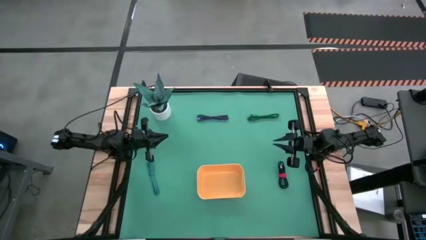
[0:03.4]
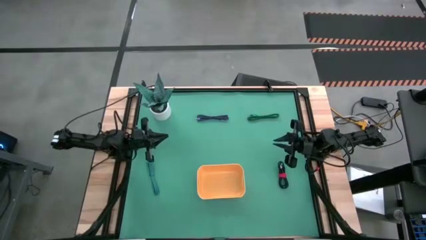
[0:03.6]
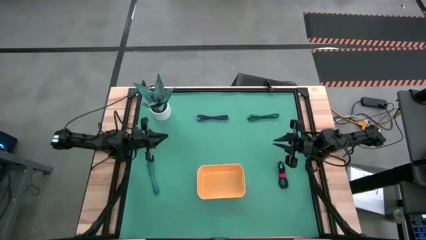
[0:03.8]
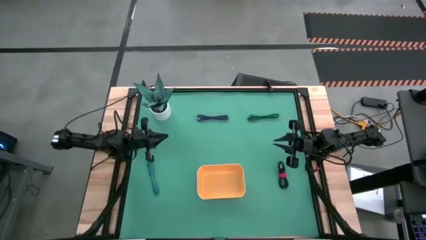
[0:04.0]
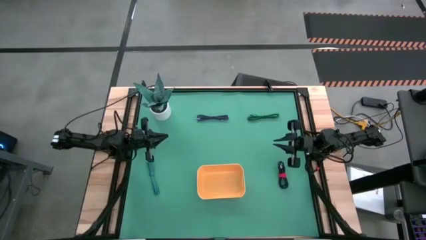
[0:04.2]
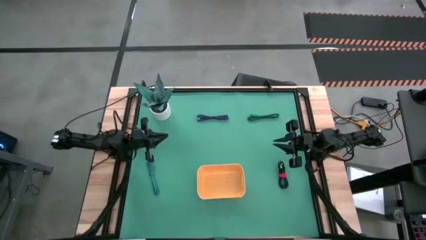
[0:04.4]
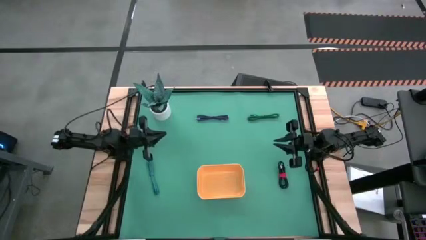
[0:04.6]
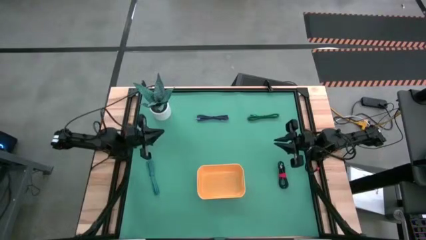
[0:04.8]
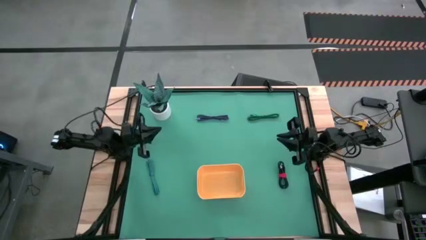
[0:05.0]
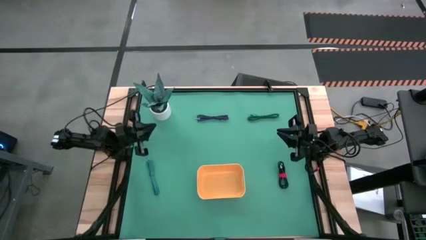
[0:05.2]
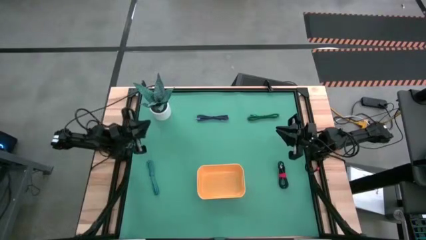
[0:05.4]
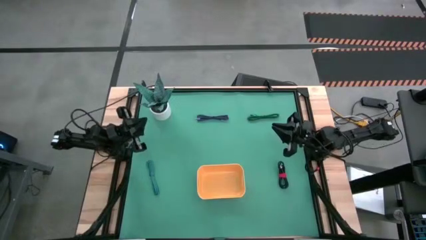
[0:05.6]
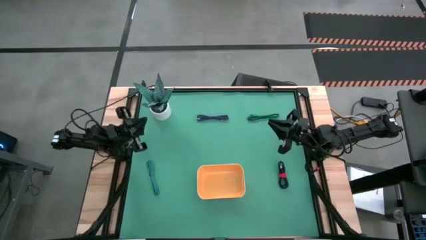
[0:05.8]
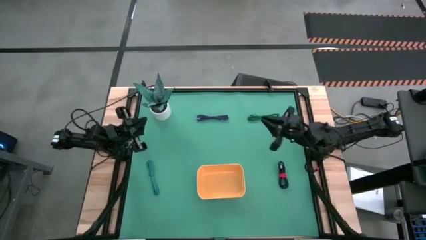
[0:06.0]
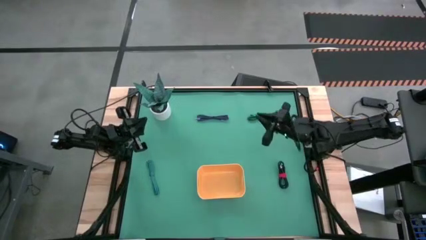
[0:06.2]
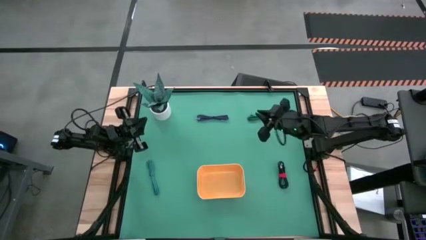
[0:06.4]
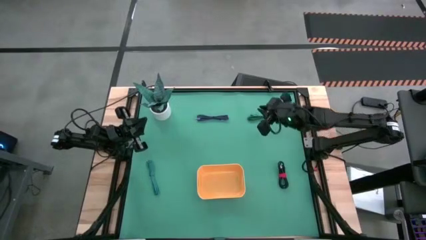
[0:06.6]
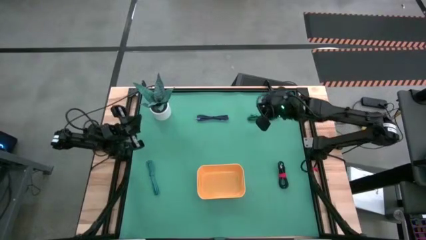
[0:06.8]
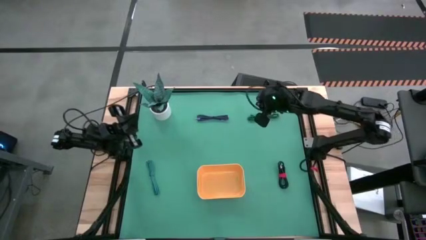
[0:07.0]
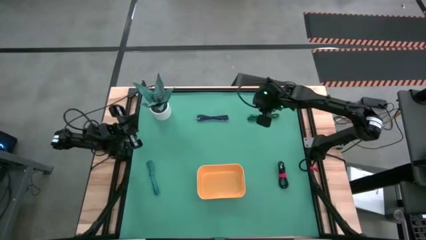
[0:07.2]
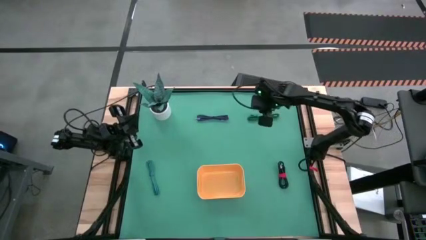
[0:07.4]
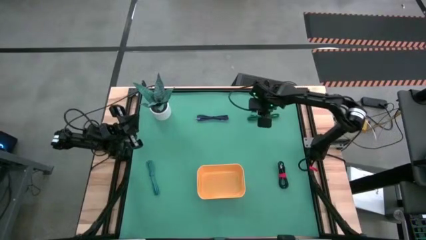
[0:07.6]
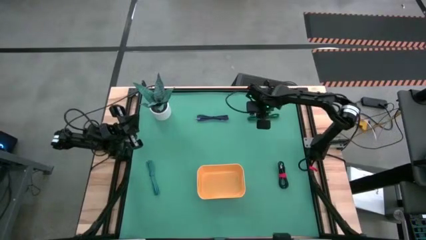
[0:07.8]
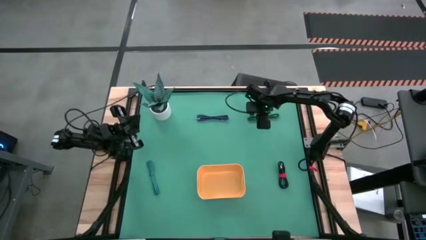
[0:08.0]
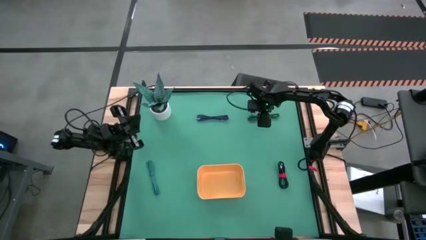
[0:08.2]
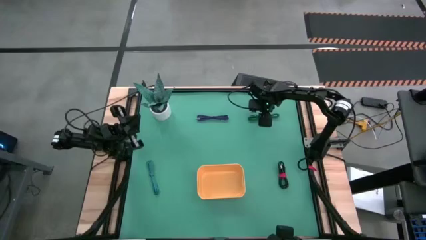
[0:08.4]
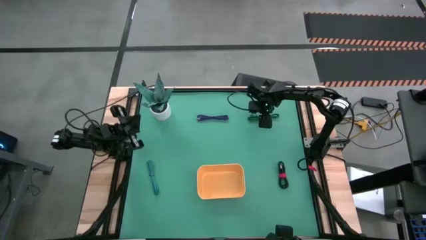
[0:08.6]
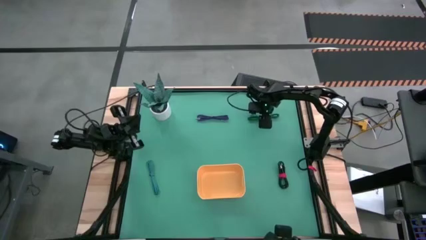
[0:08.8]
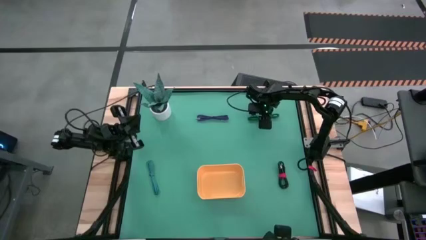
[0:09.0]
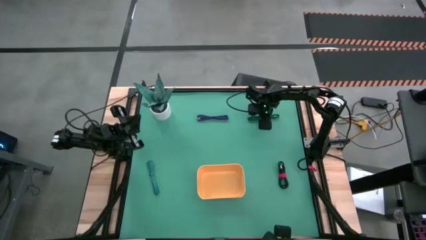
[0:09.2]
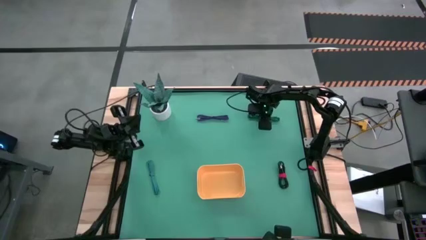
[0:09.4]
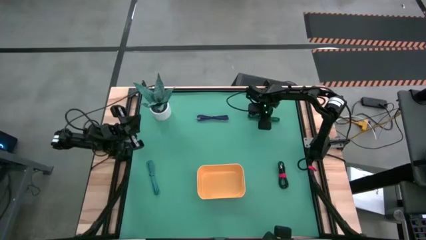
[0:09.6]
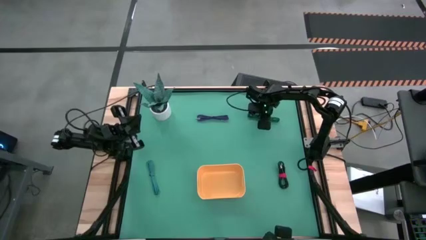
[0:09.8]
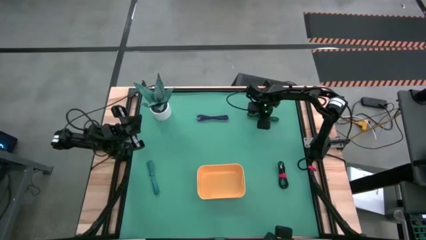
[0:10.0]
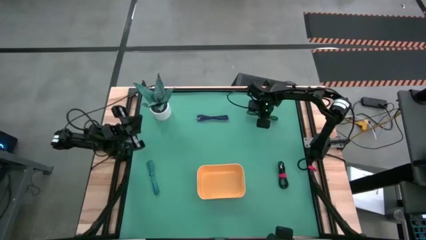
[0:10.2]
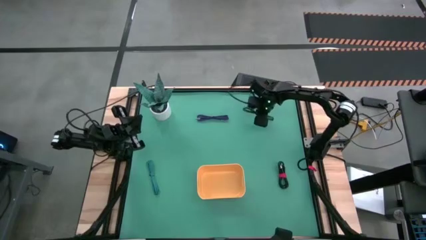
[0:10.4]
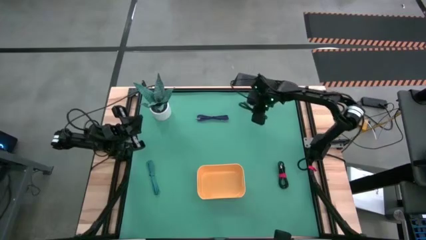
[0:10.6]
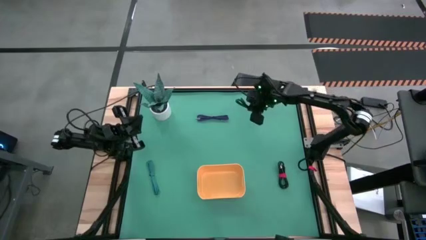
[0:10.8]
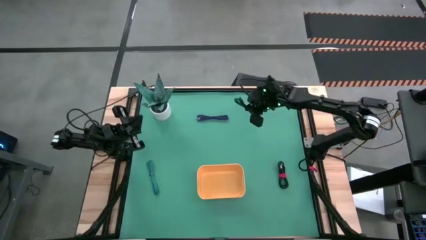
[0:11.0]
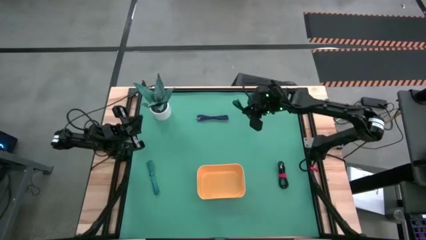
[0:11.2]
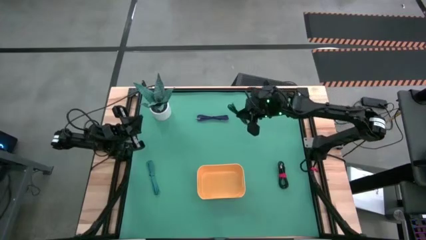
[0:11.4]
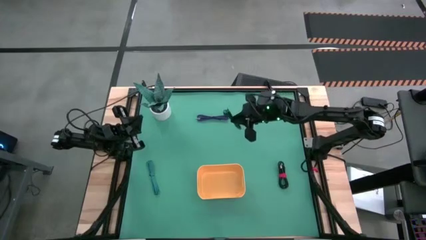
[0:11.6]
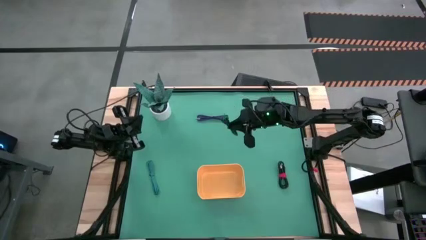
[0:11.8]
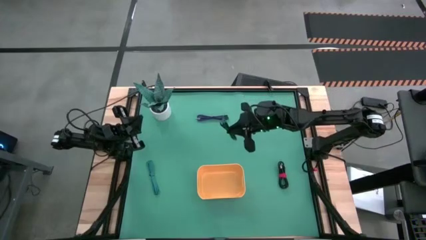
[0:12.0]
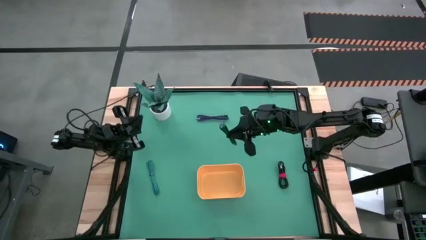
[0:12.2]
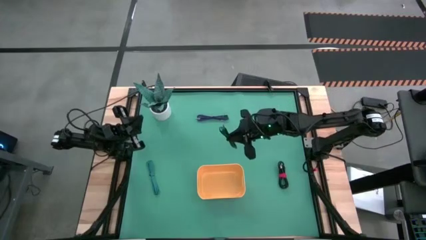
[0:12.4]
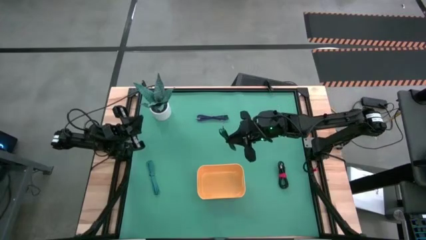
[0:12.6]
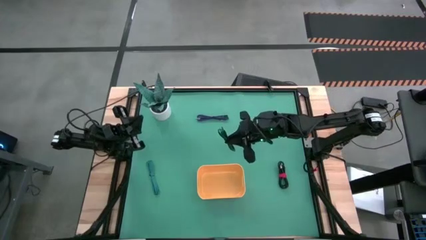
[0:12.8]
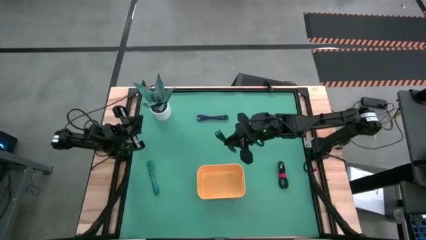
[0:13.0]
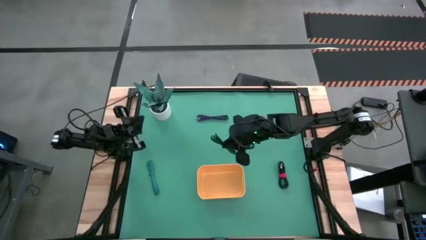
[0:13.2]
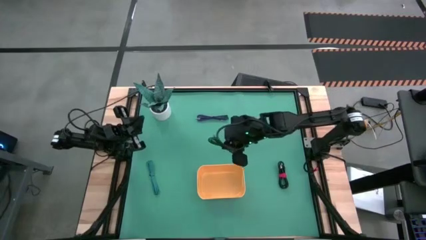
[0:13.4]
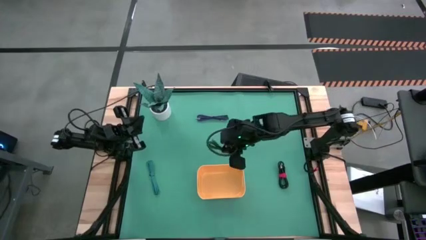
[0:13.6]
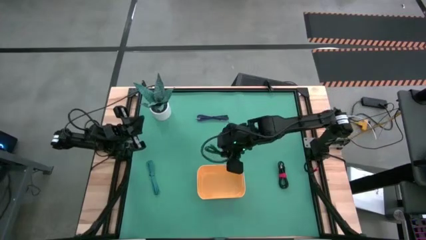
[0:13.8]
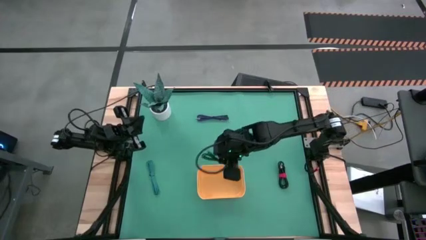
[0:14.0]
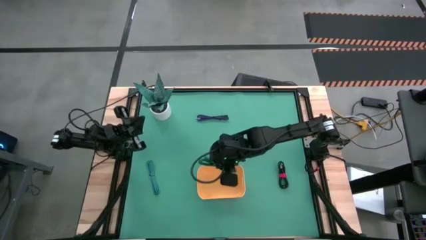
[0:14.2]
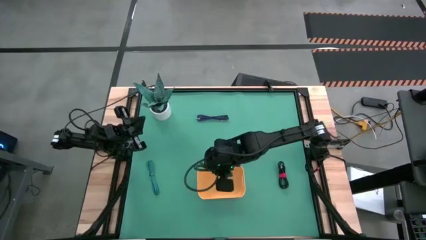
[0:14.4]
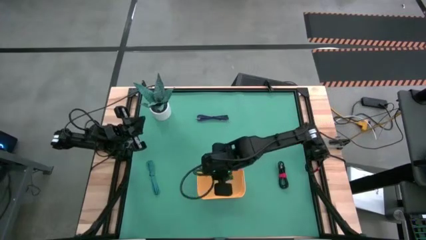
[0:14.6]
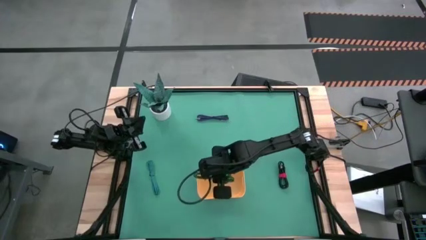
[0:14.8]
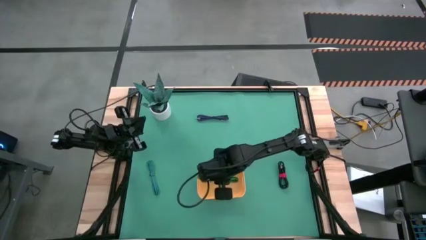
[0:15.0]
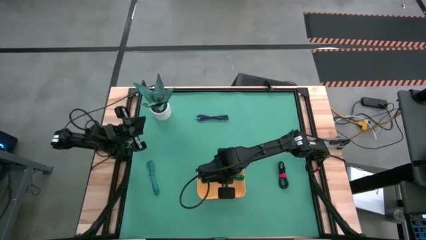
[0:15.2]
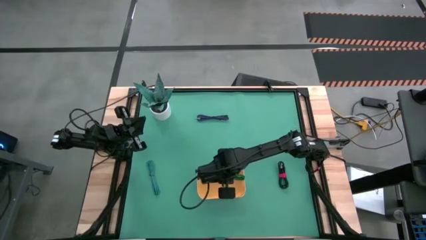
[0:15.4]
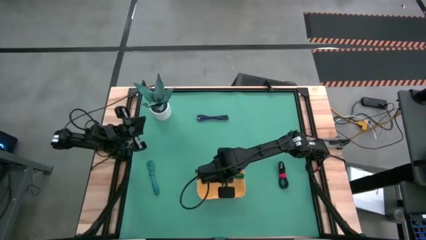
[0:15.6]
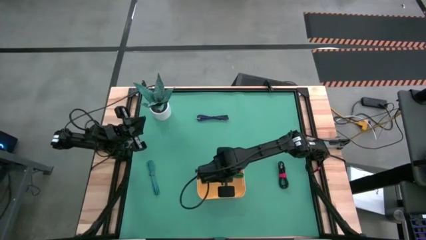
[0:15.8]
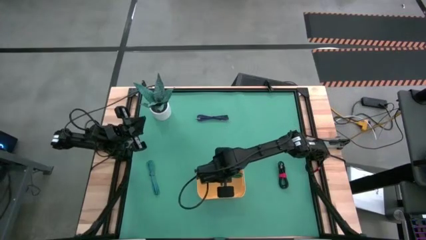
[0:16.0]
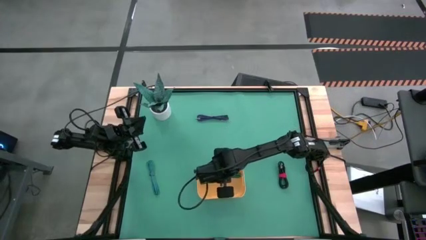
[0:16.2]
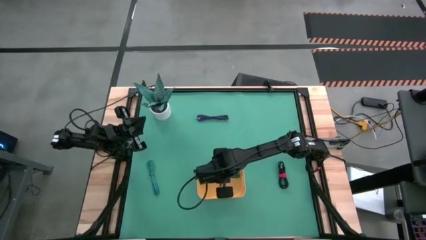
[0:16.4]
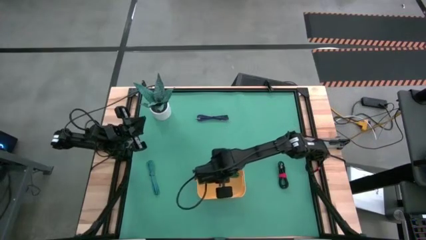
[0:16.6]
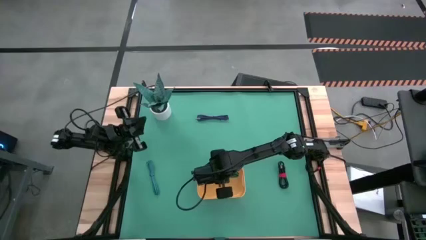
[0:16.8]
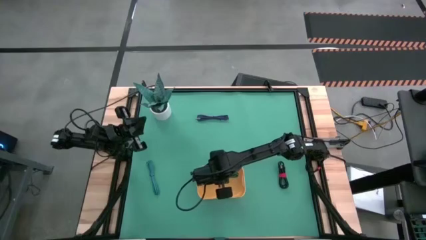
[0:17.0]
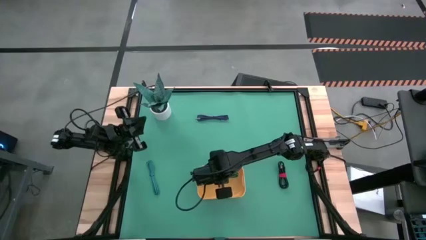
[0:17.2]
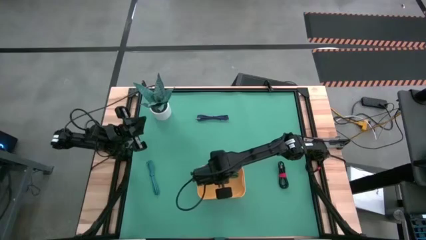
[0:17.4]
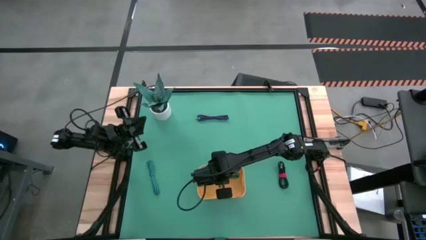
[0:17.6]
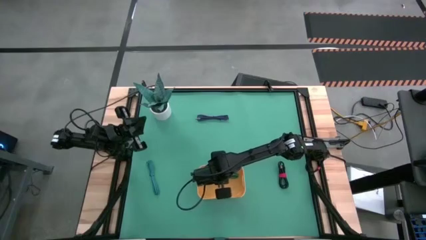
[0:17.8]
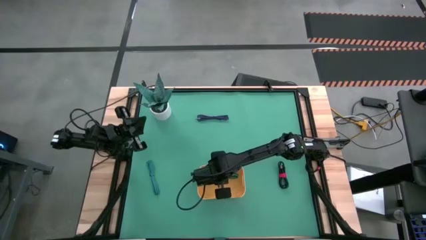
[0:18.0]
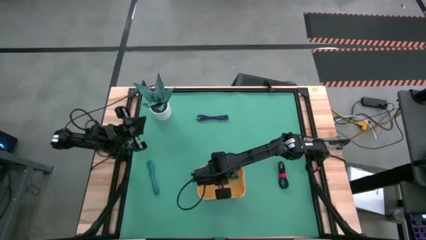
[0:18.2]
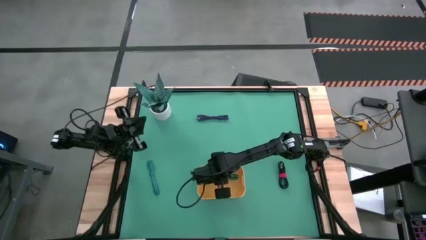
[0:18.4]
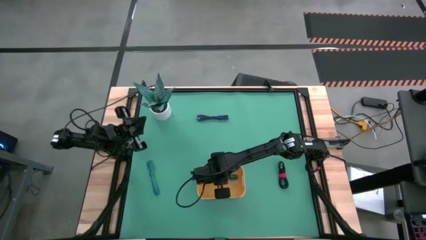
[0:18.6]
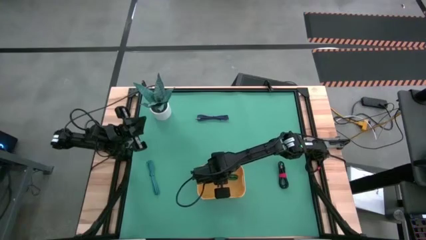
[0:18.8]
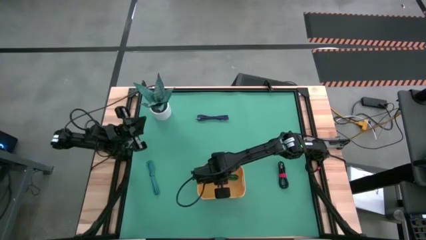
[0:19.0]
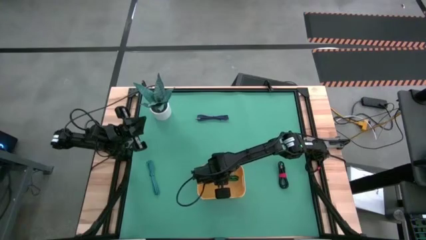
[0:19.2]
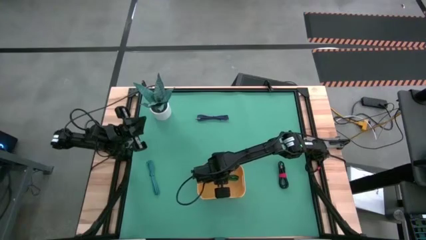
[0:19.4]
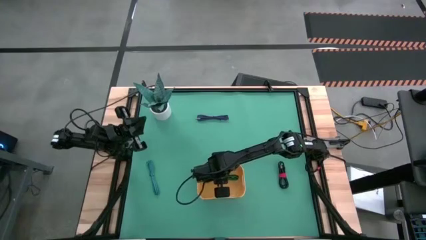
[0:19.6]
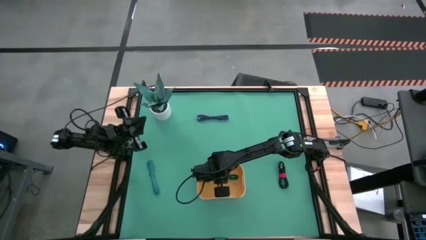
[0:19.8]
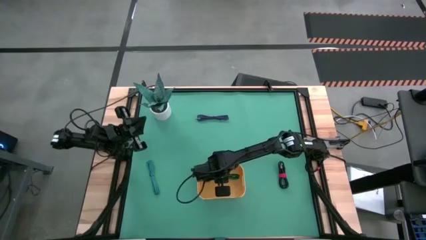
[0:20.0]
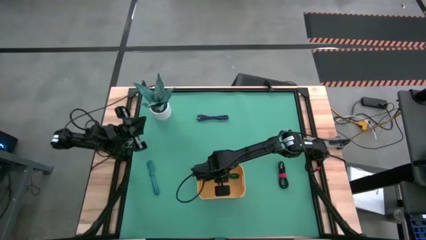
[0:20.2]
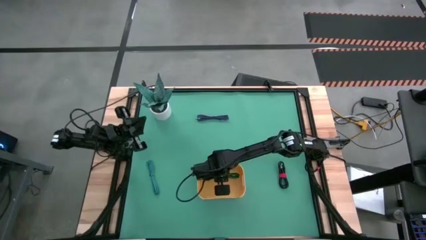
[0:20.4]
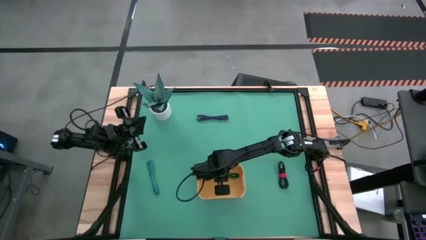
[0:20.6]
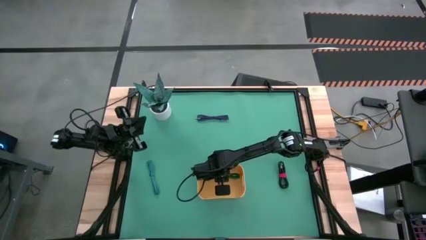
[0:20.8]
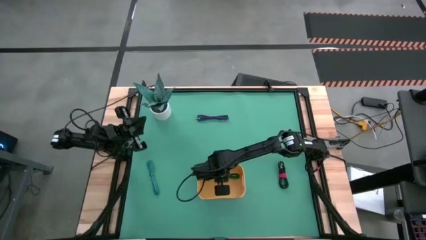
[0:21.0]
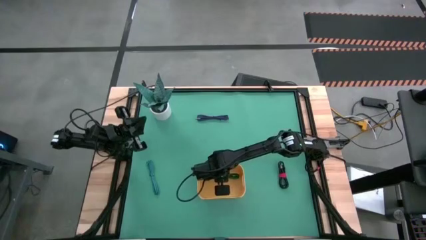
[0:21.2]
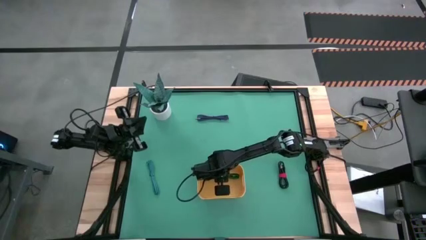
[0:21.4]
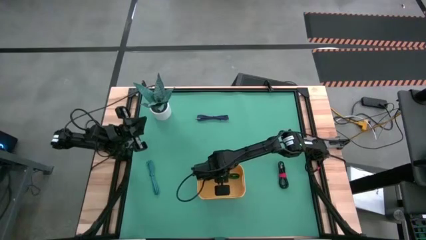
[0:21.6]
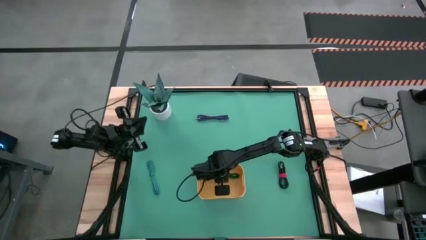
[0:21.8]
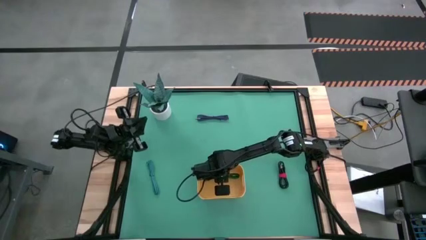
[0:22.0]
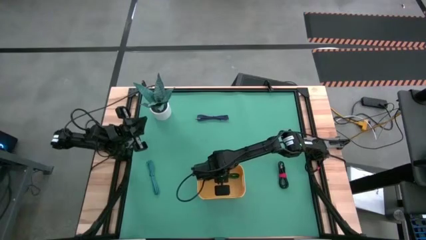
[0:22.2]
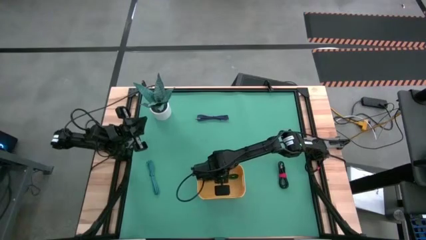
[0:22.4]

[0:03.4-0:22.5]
Task: Pick and place USB-C Cables
Put the green charger cable into the yellow bin
